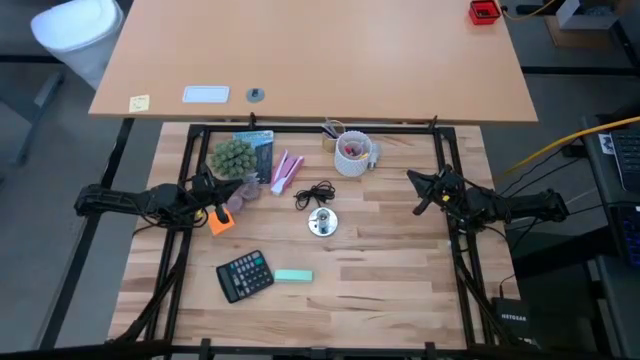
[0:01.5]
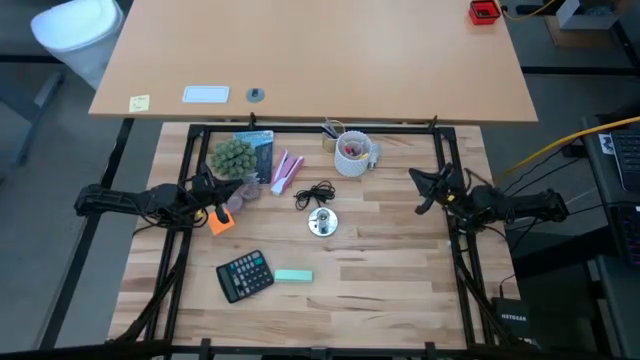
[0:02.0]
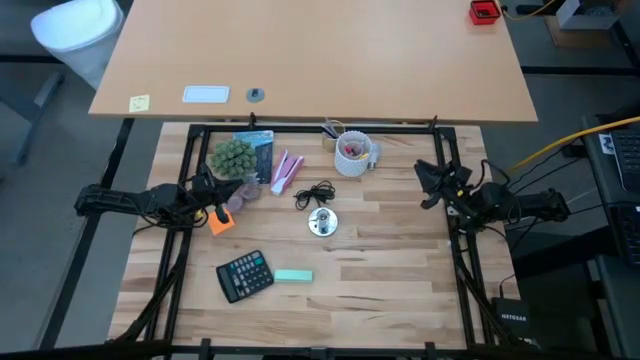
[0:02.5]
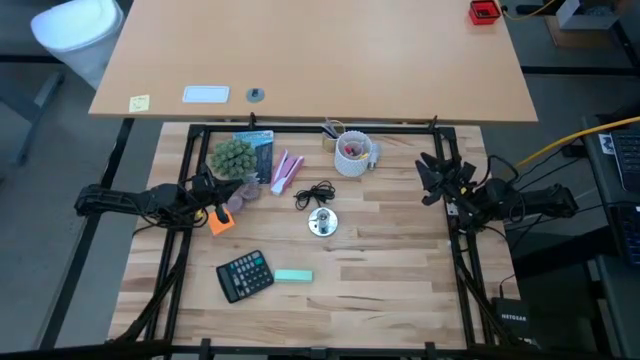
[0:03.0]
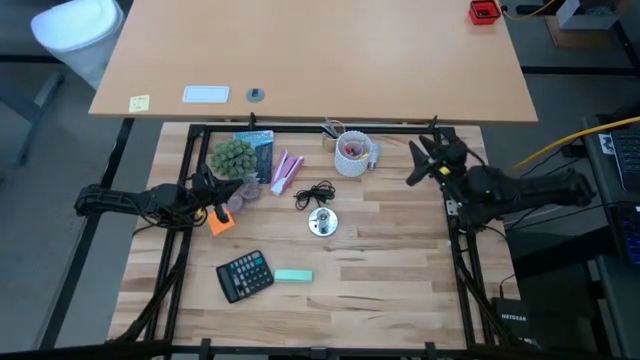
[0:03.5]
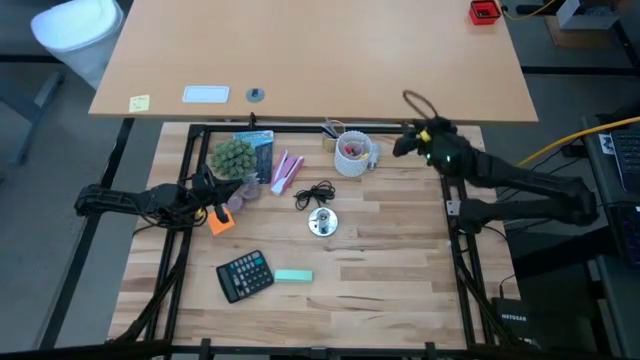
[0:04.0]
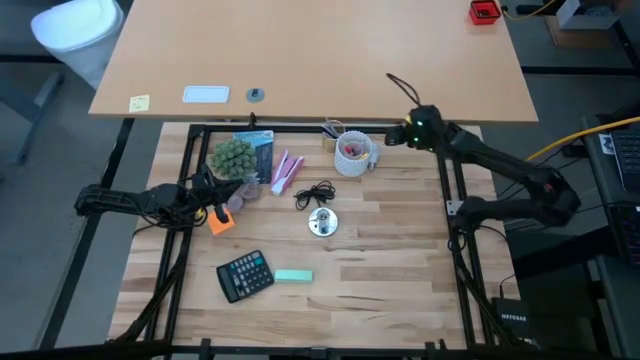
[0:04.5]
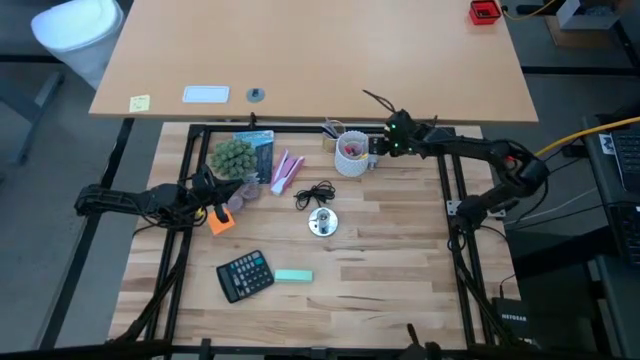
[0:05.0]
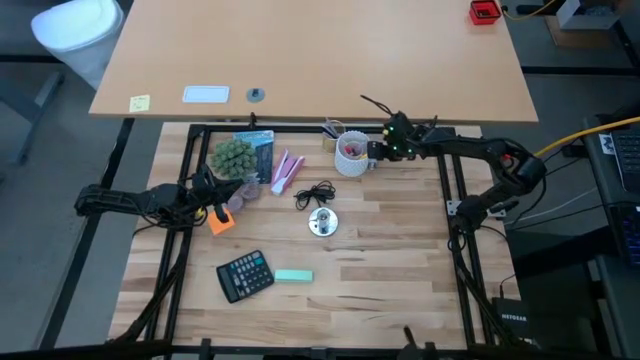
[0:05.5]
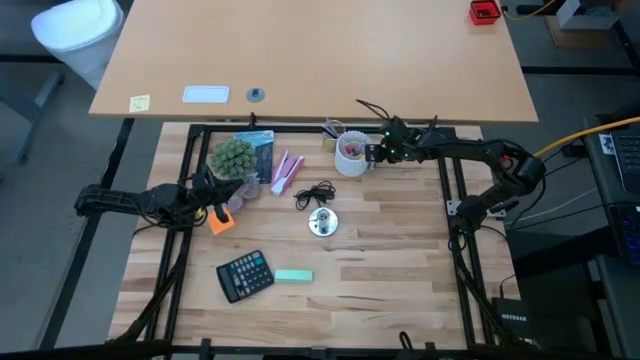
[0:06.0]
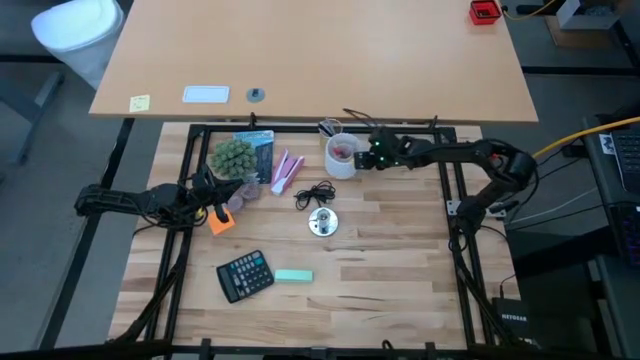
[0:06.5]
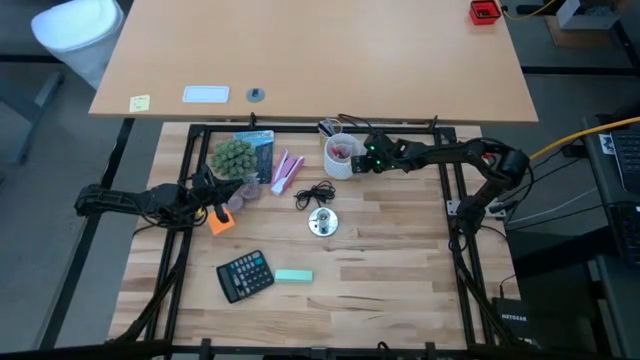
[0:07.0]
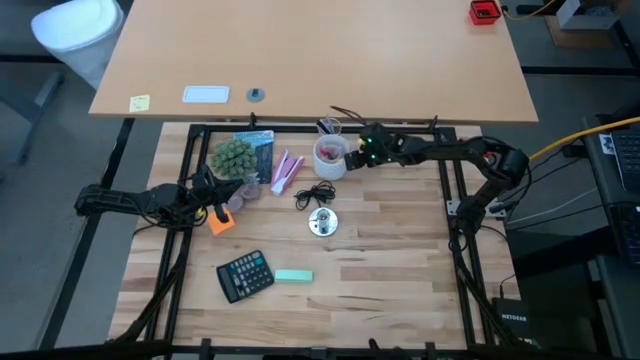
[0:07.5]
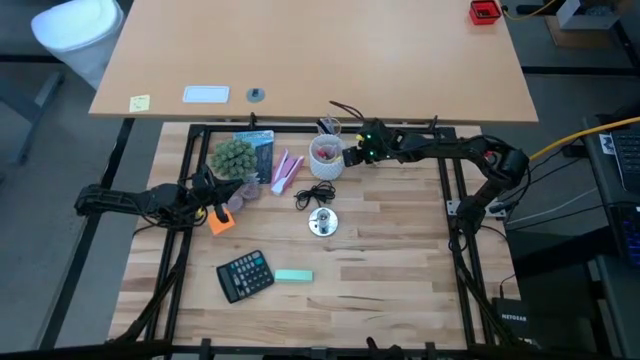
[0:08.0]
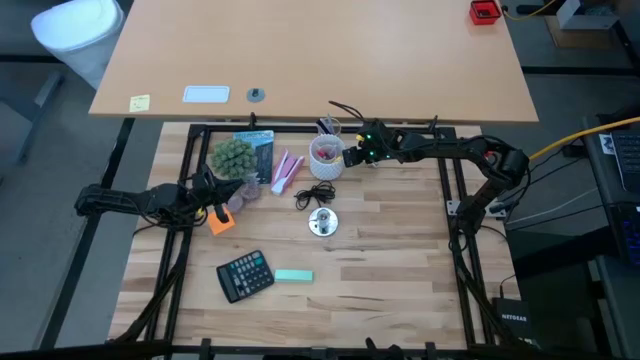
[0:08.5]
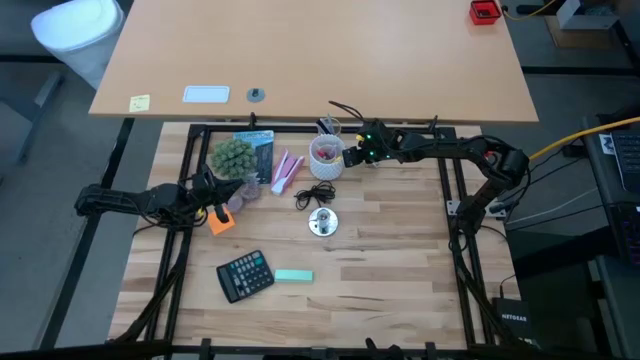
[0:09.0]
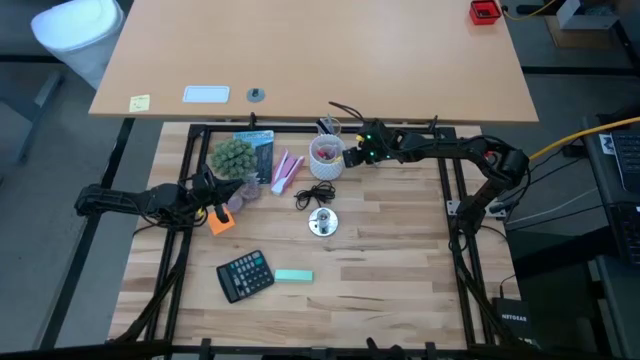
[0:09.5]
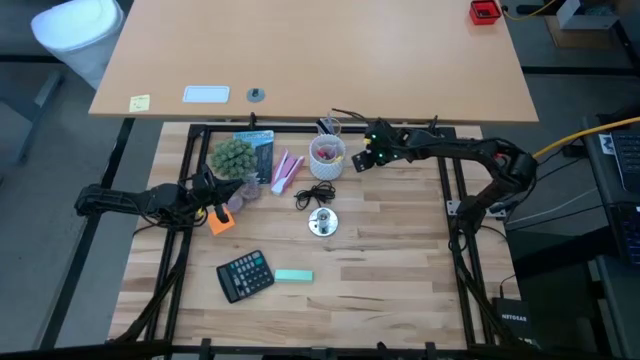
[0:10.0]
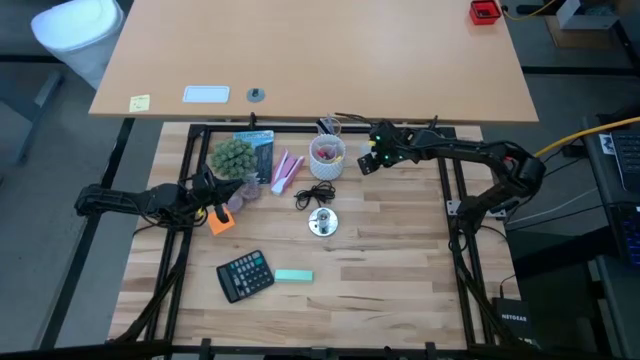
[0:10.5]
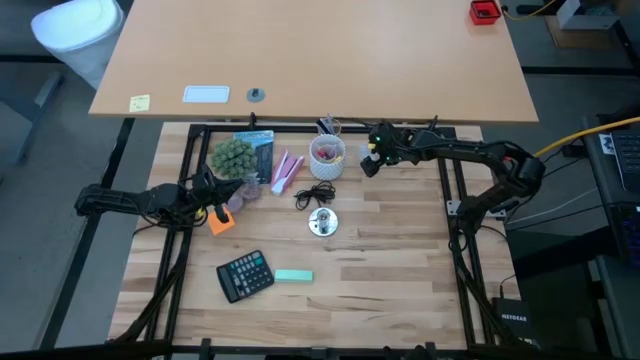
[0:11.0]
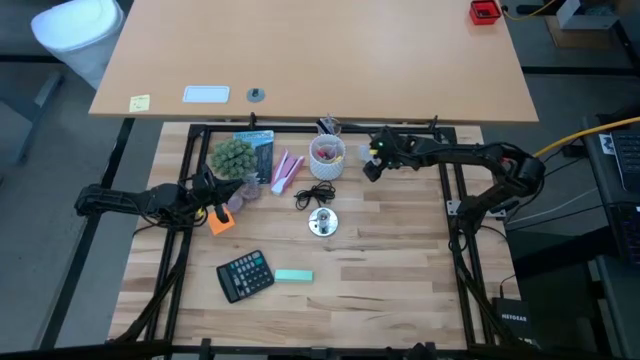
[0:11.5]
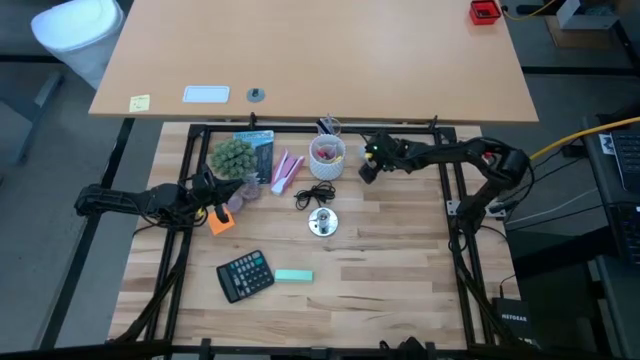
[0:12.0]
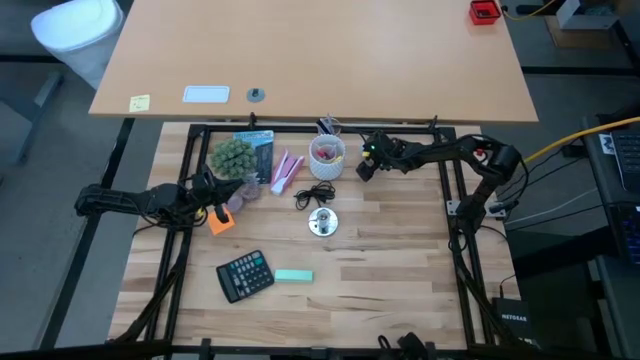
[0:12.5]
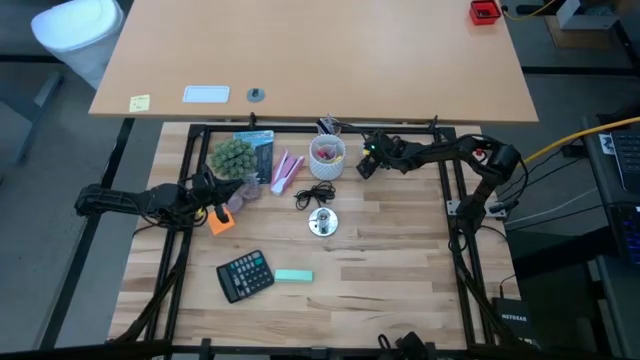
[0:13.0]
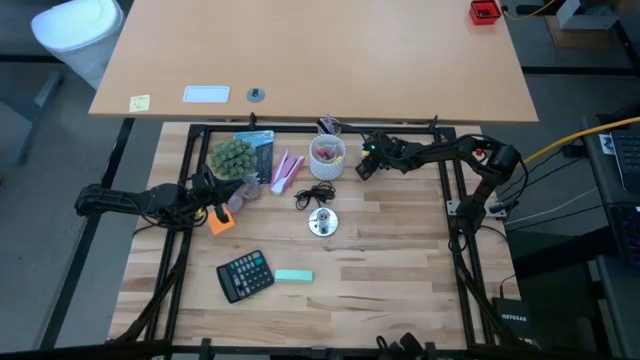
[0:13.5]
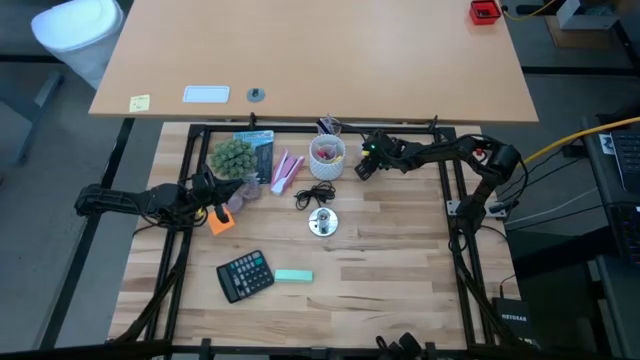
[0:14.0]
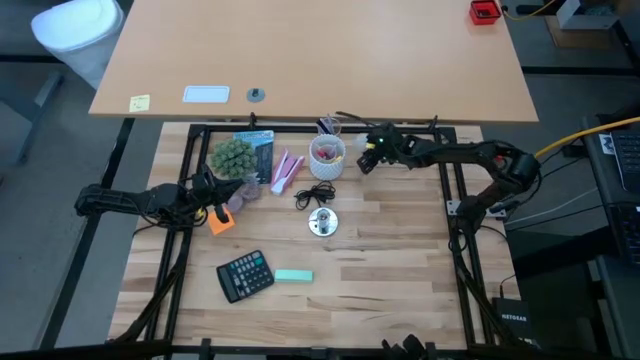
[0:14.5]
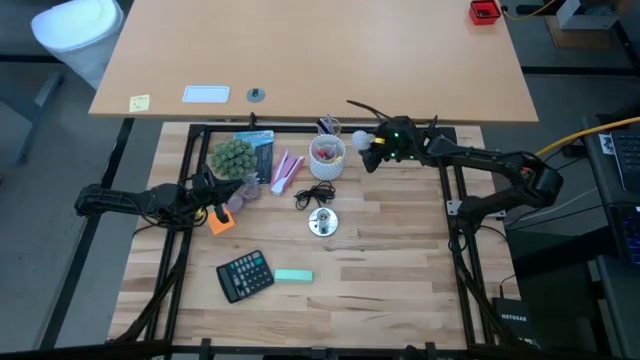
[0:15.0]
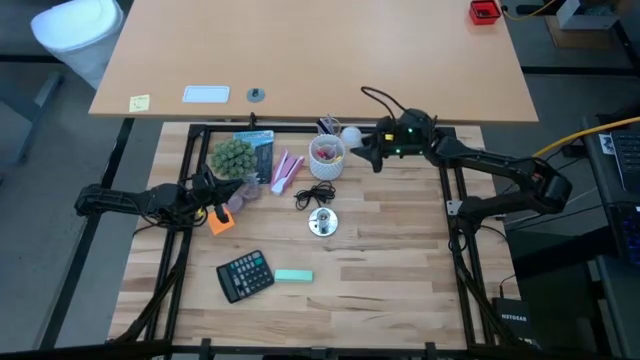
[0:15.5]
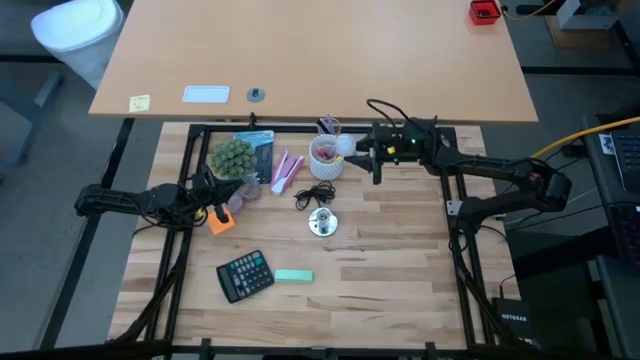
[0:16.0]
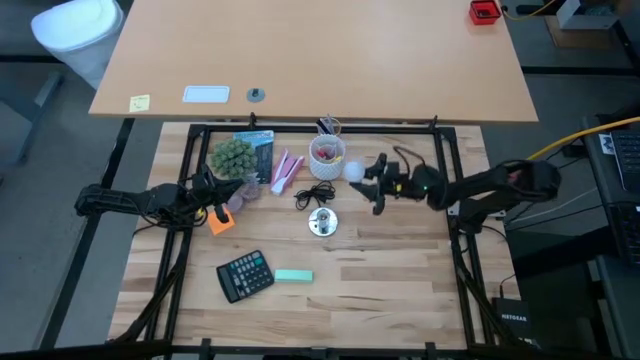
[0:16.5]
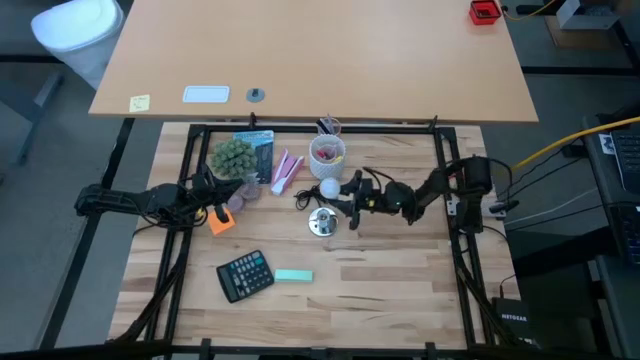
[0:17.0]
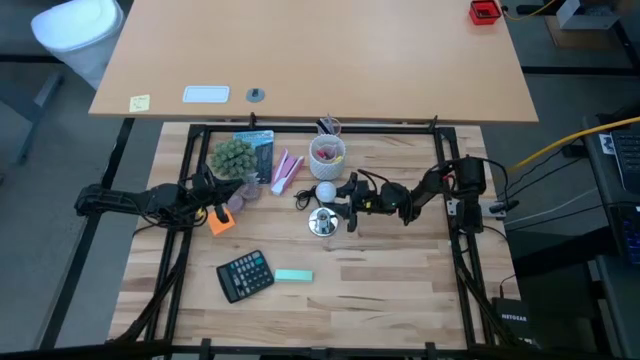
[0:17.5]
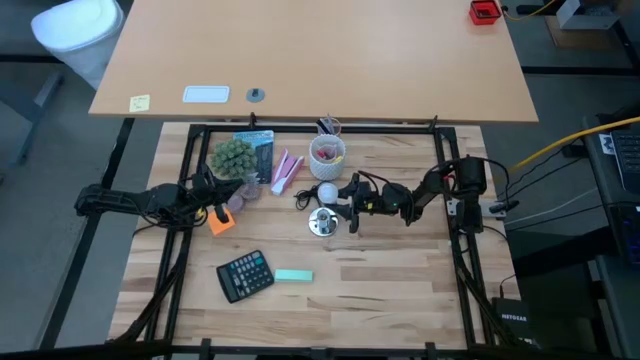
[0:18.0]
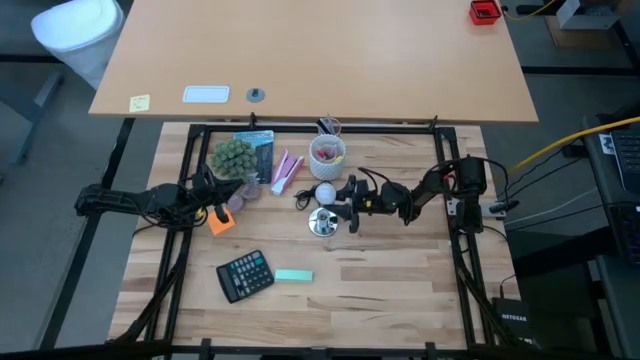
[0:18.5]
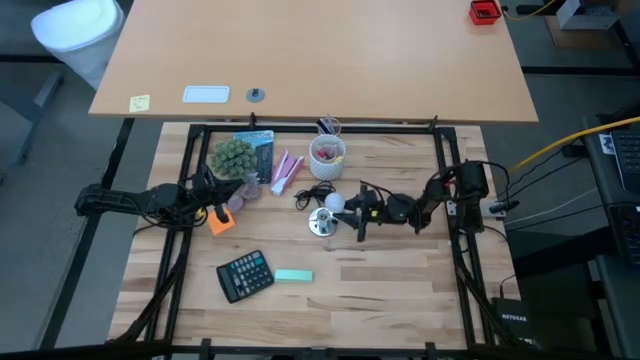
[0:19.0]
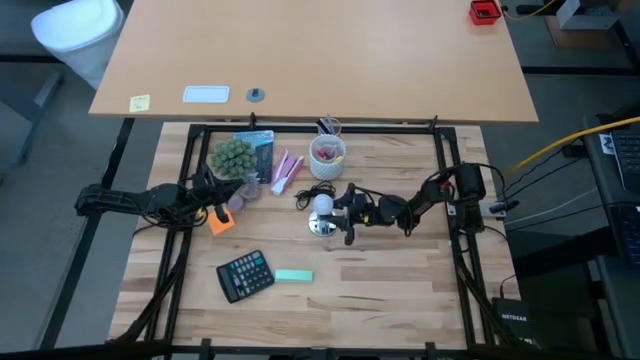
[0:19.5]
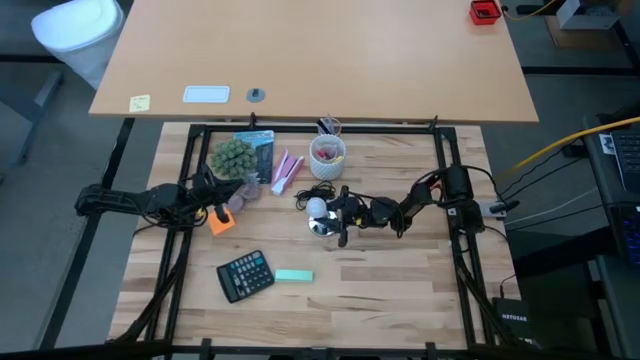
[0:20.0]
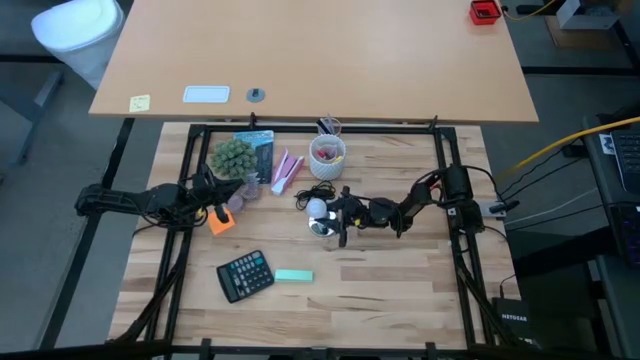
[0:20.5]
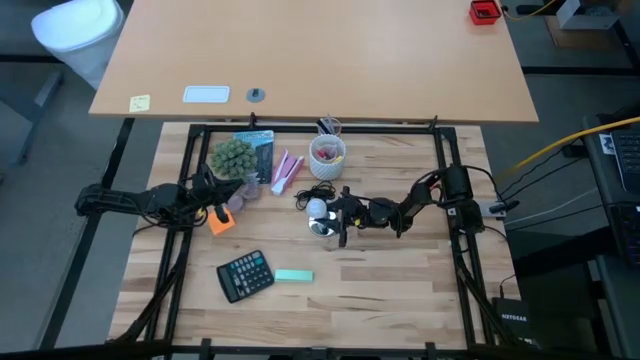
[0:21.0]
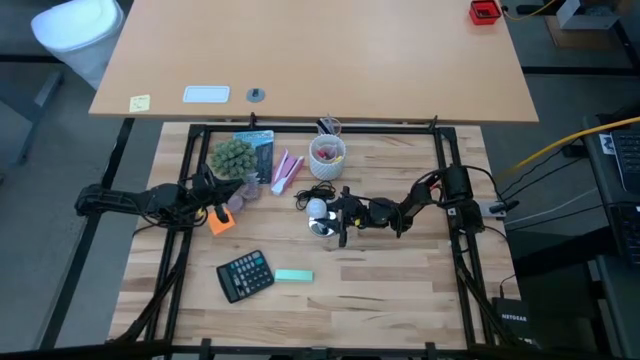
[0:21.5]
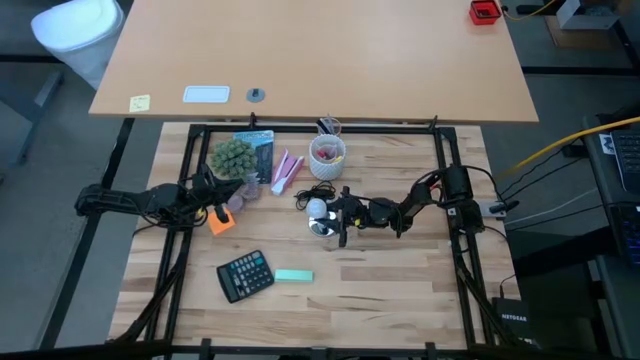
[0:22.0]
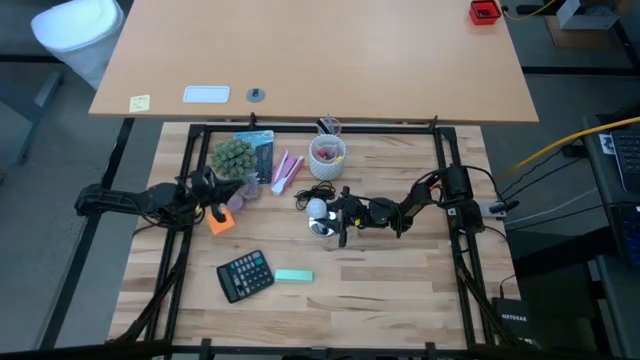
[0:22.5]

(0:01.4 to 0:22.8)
Task: Screw lightbulb
Insert the lightbulb into the lamp
